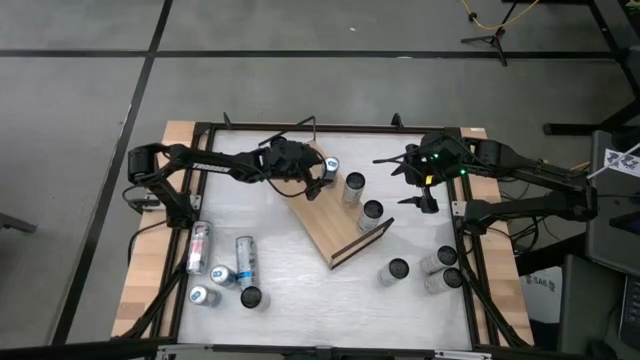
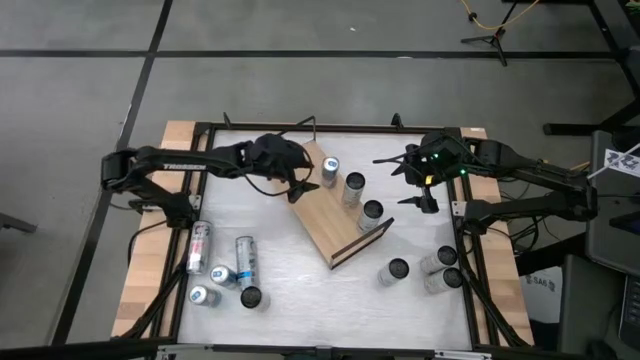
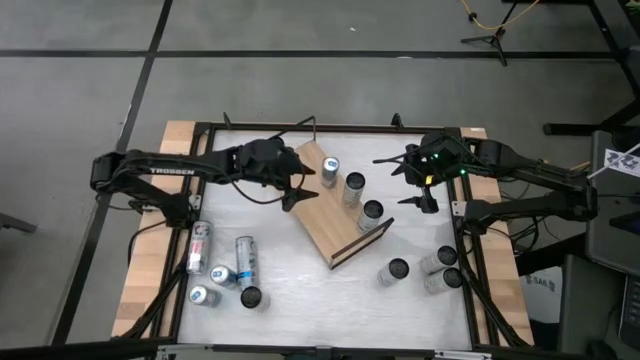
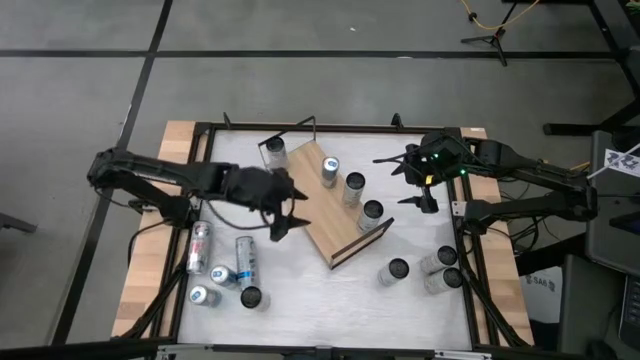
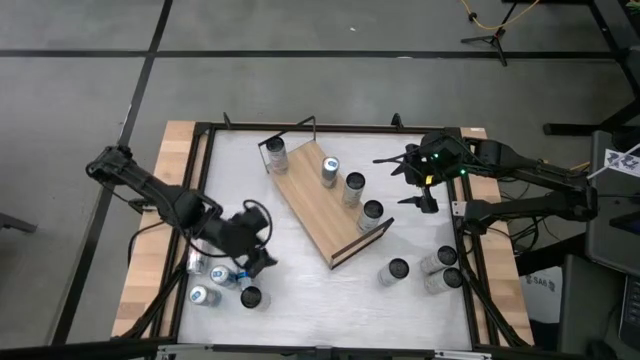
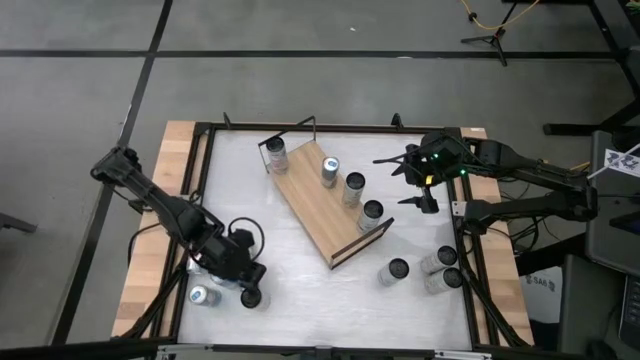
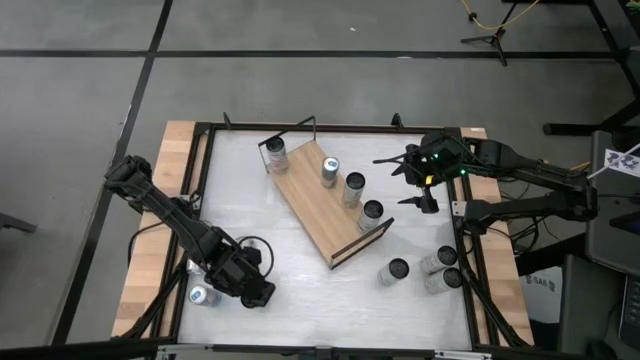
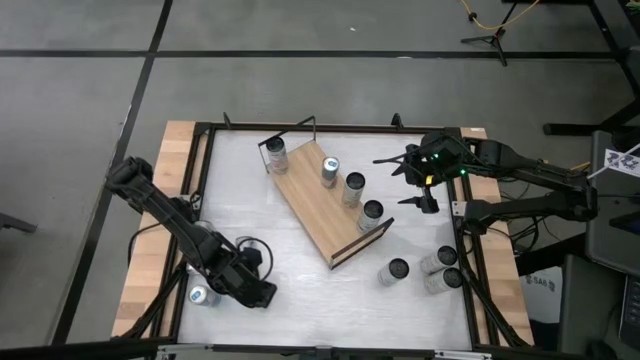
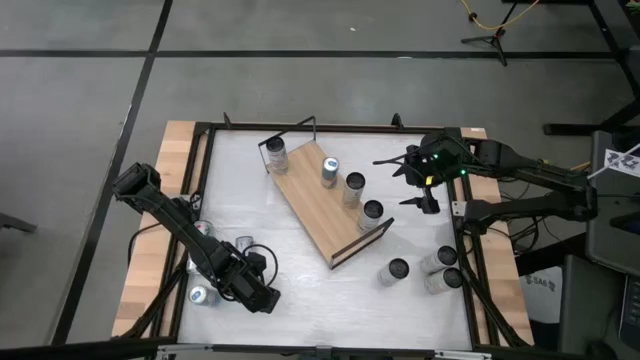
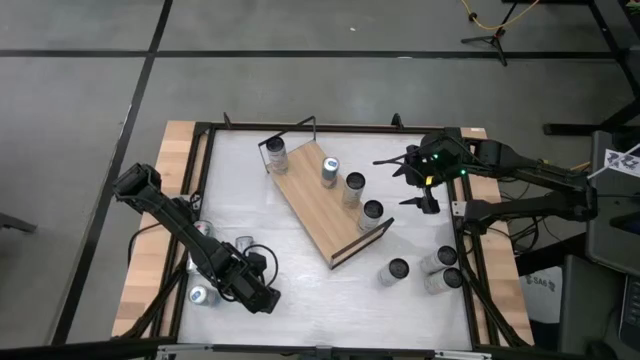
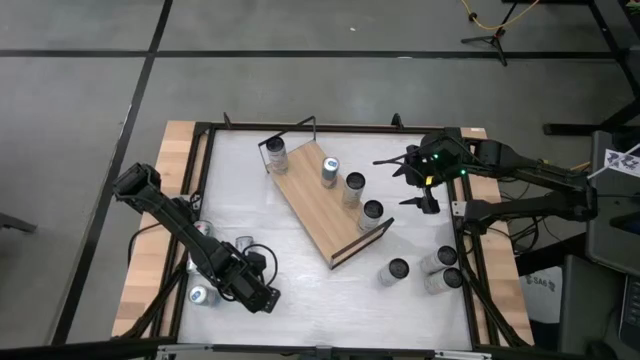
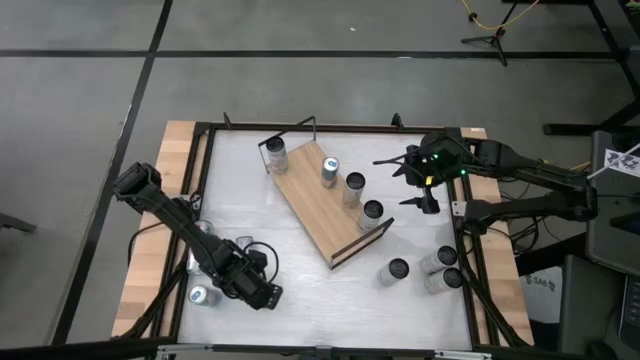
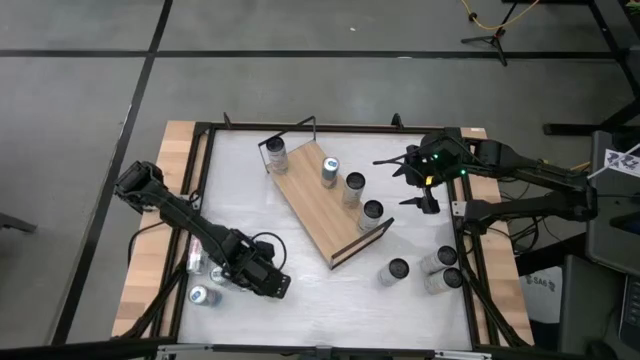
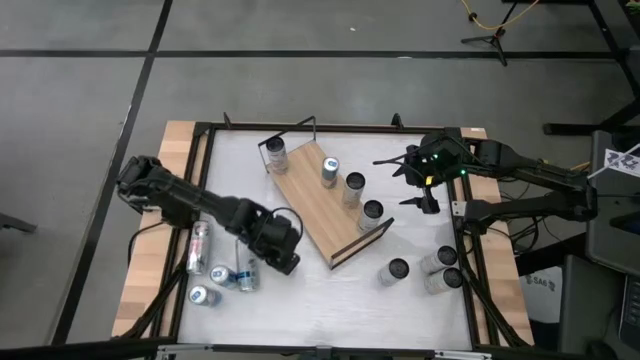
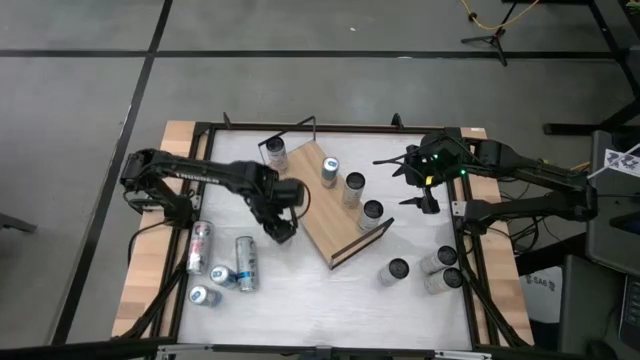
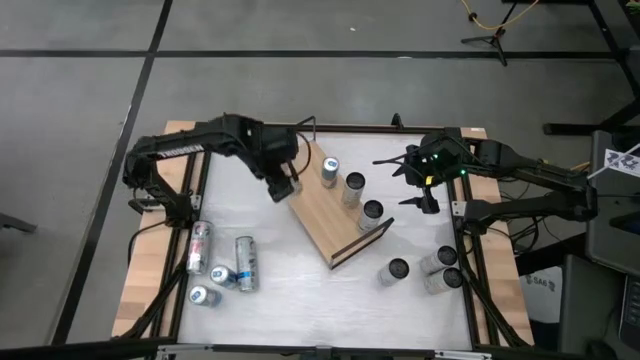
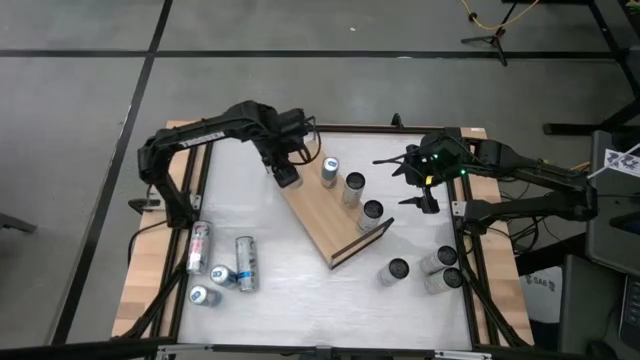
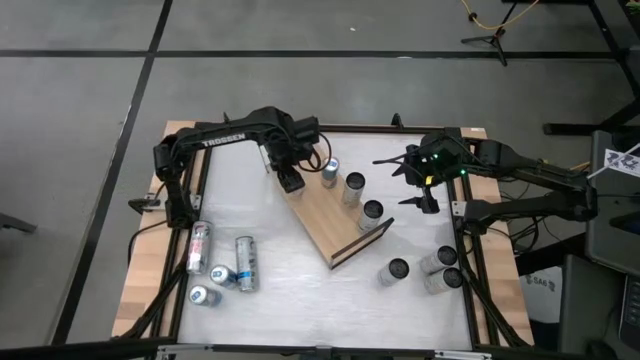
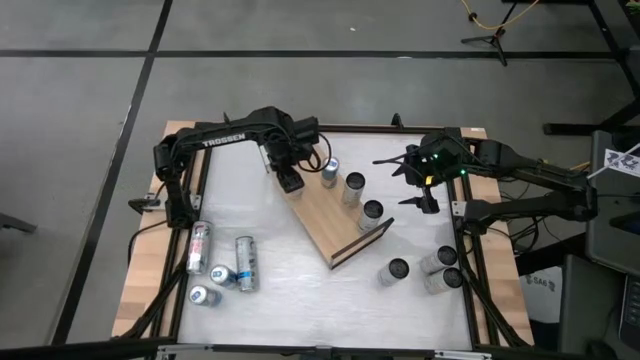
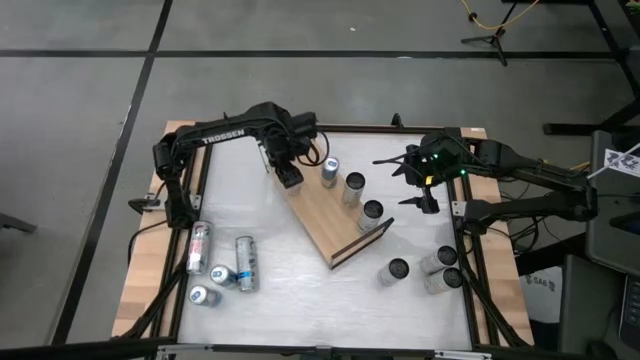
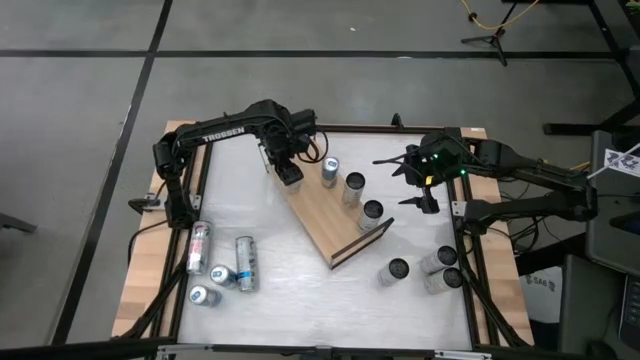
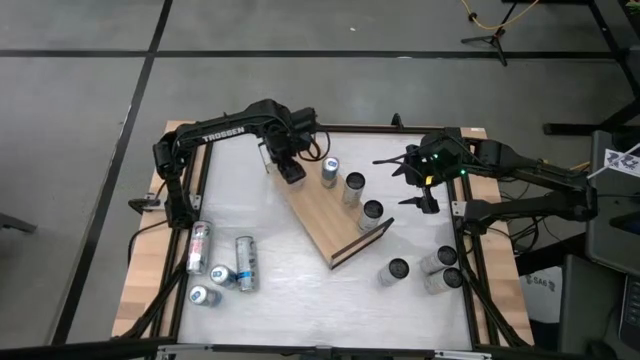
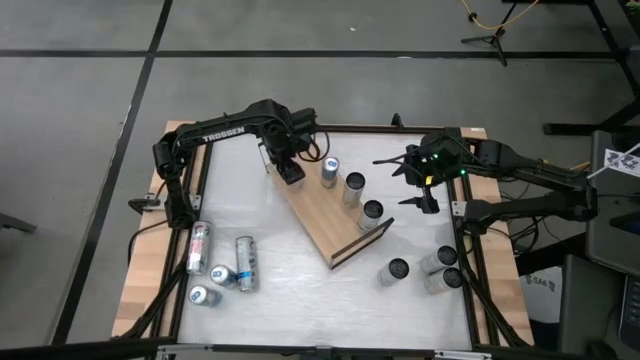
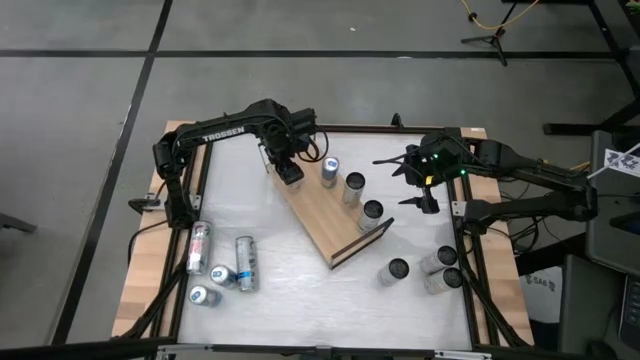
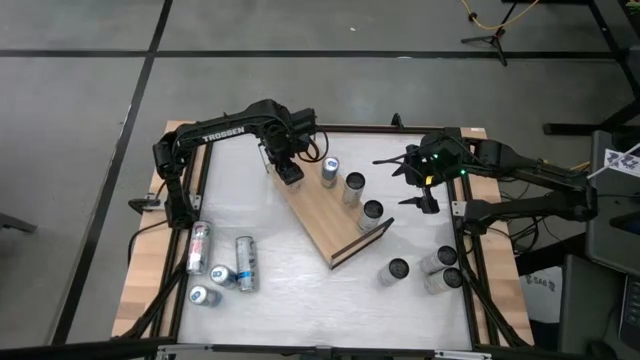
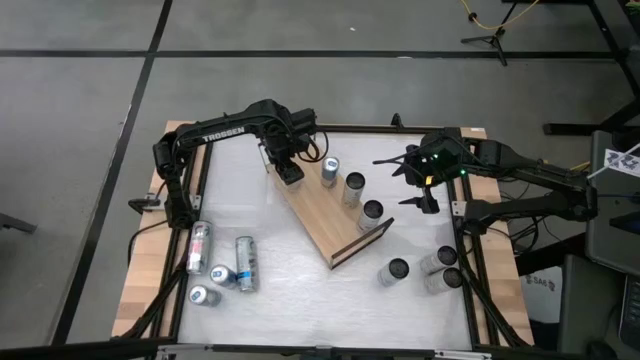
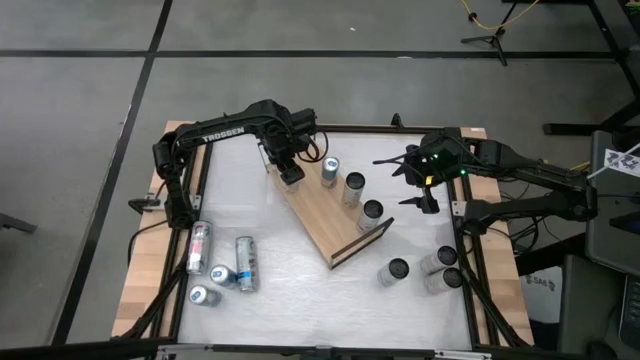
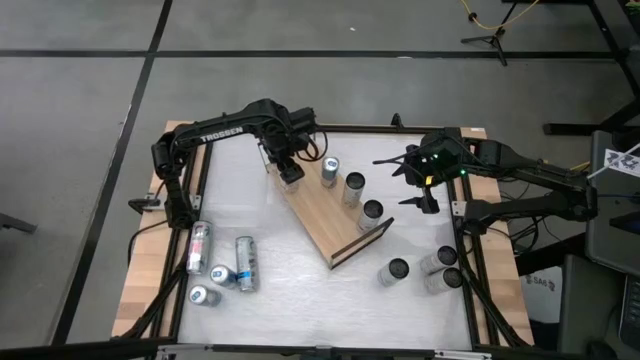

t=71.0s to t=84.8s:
Task: Place canned beverage on shelf
Put the right white-pink soda can on the shelf and align with the other white-pink soda can

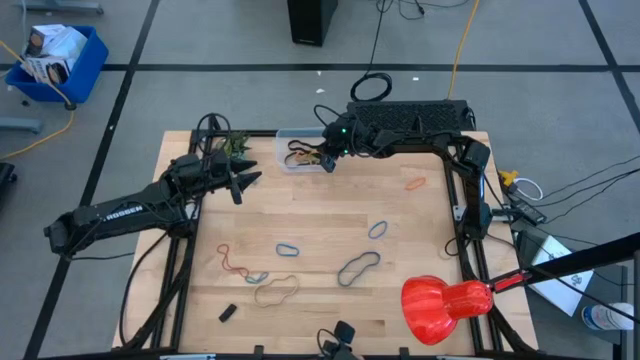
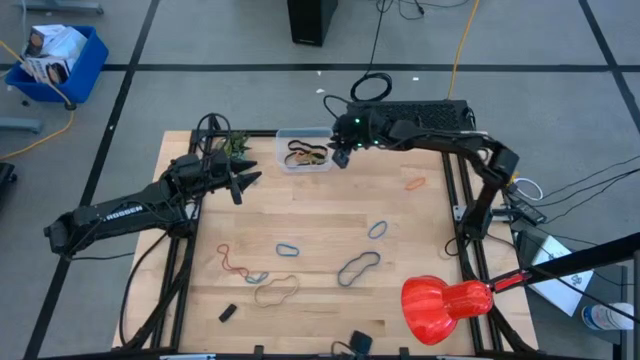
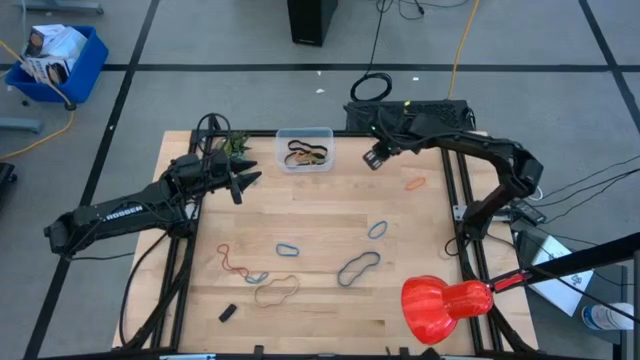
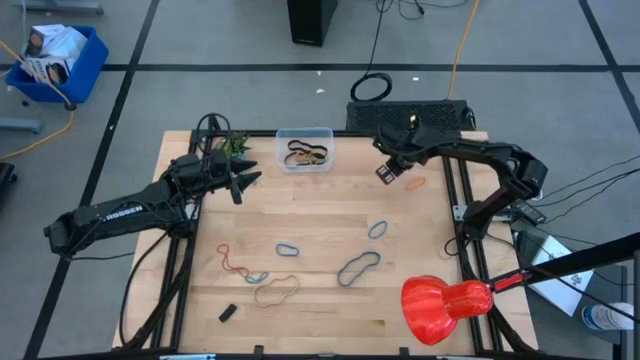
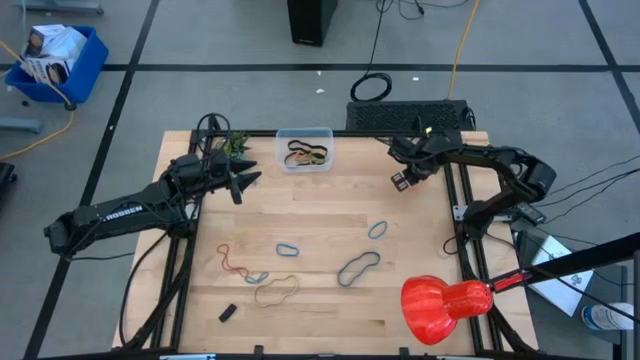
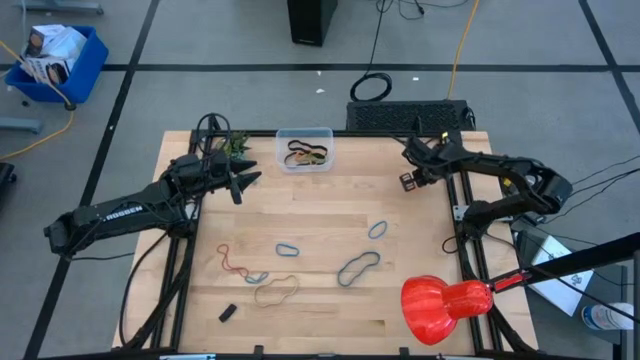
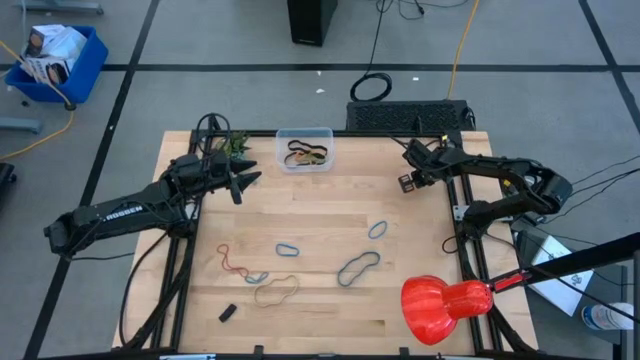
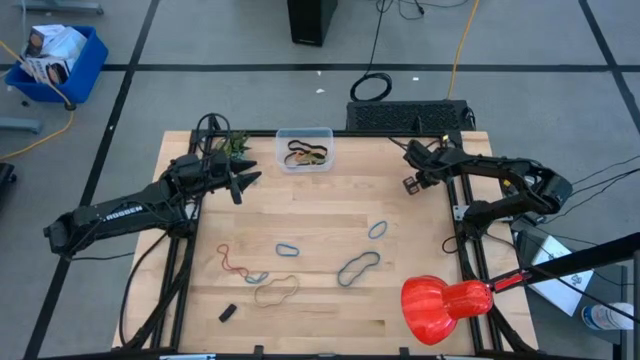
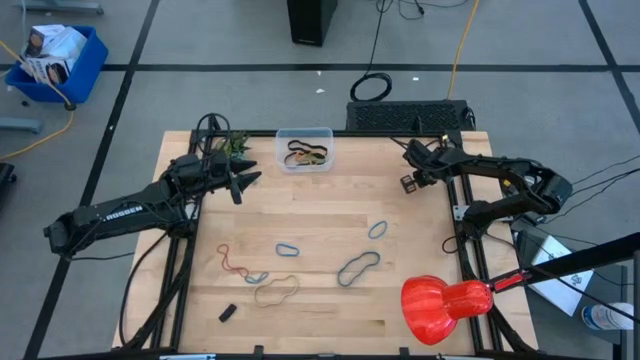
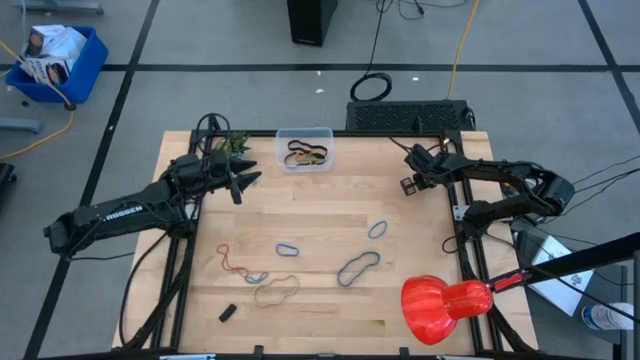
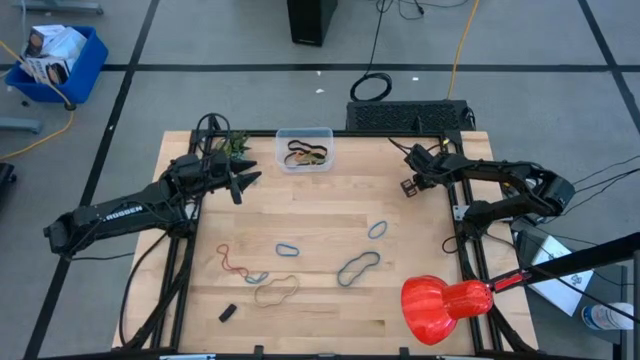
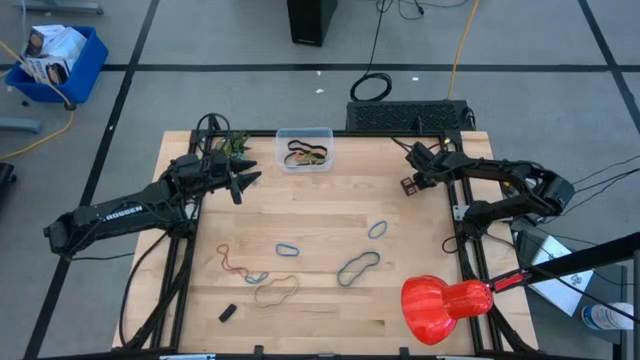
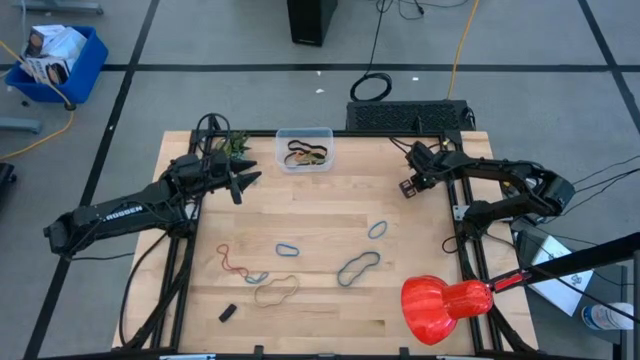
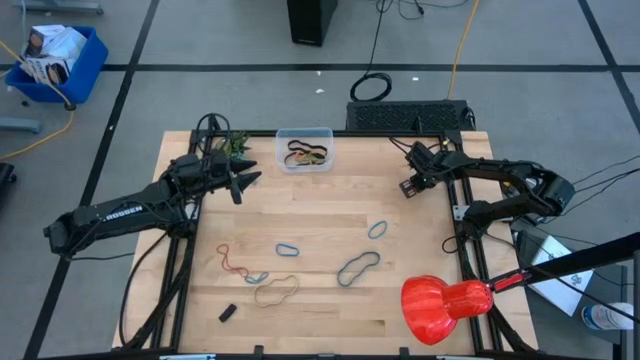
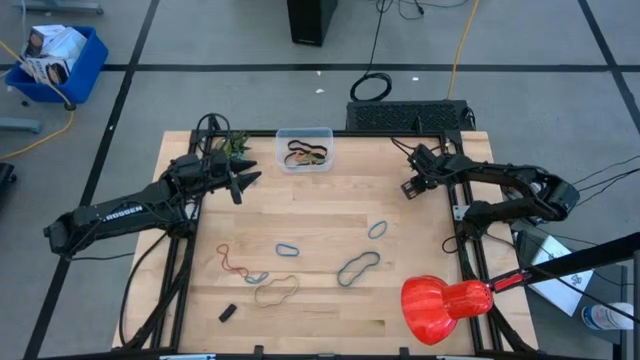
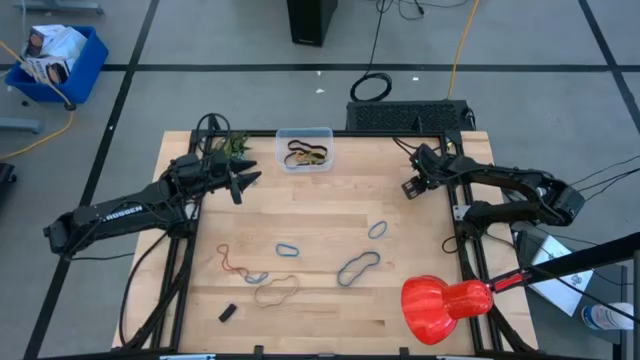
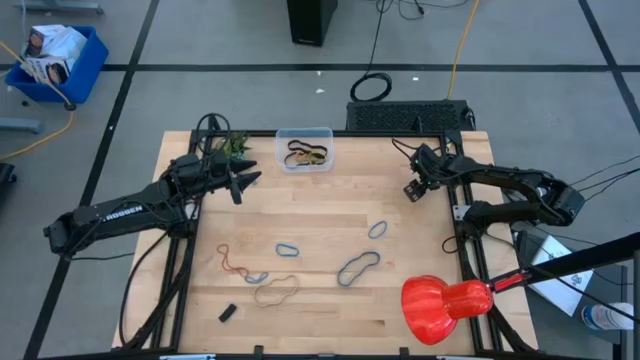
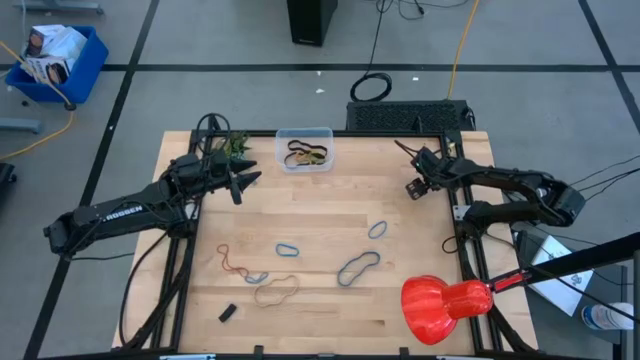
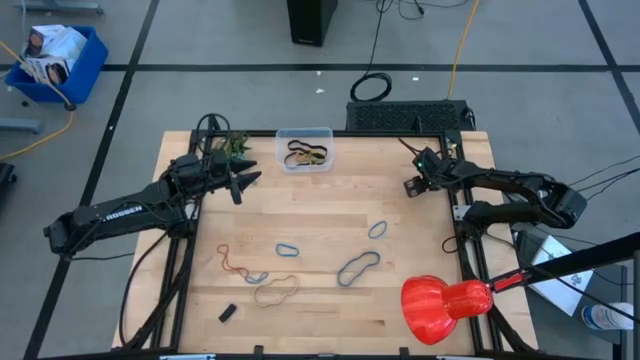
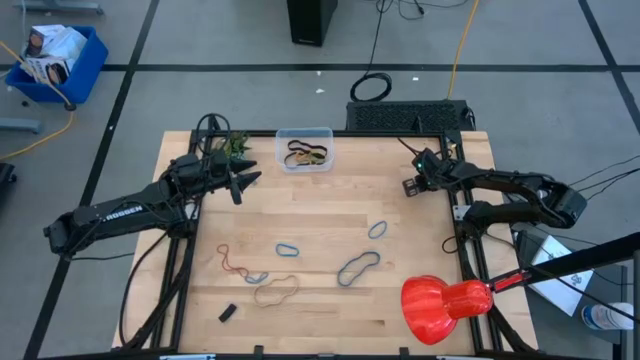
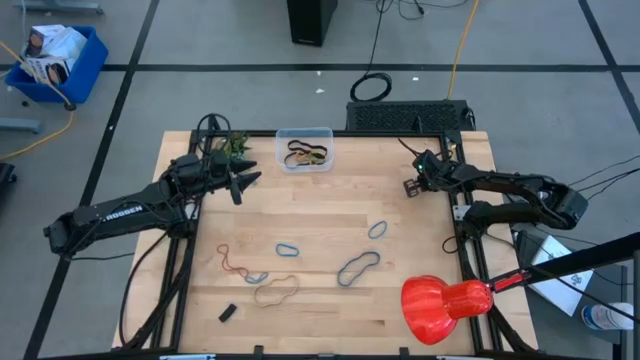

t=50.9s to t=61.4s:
Task: Pick and place rubber bands into bin
Put the orange rubber band into the transparent bin
